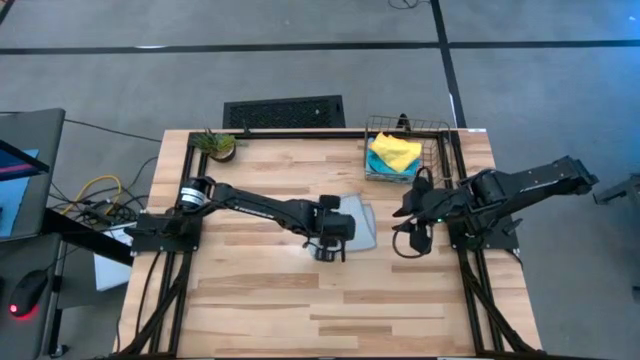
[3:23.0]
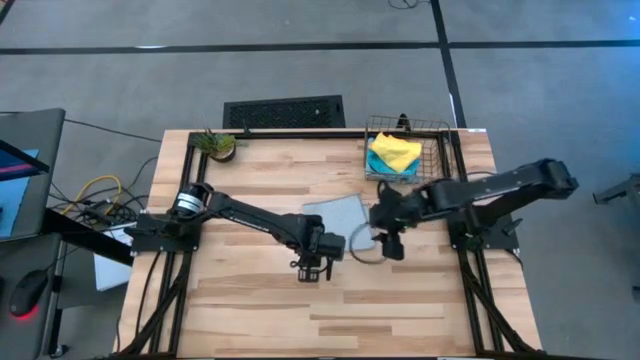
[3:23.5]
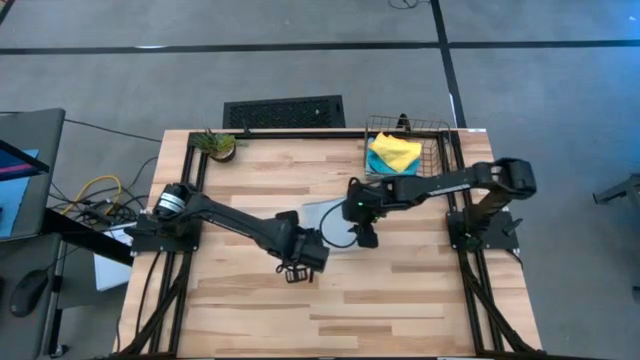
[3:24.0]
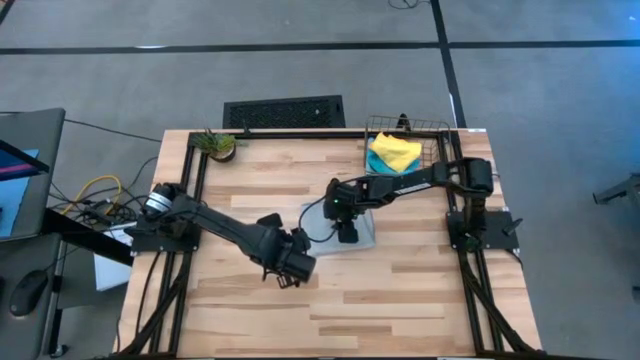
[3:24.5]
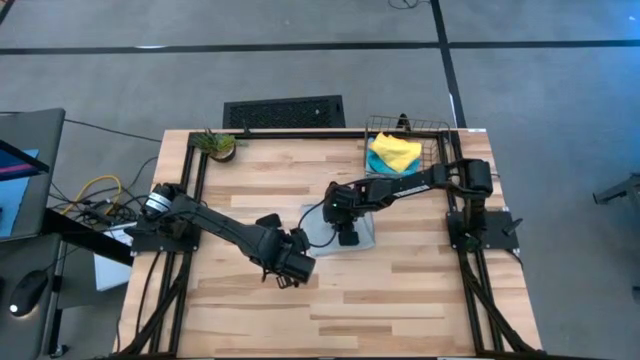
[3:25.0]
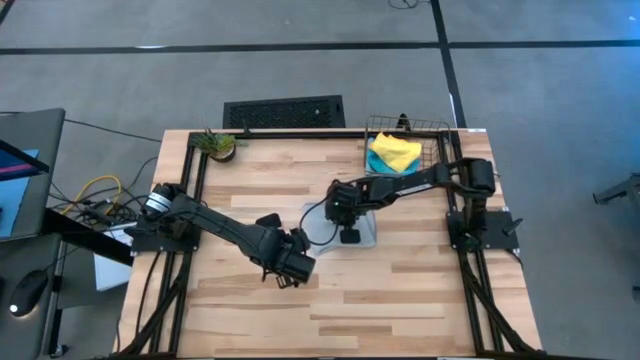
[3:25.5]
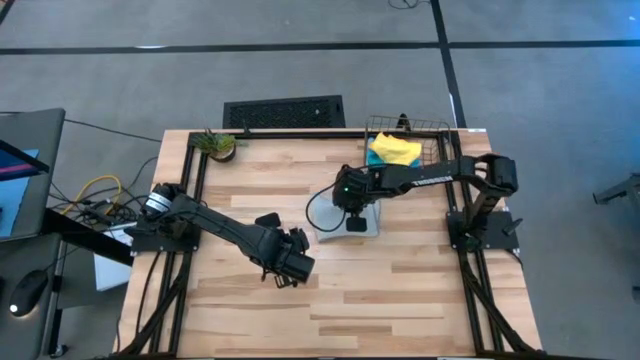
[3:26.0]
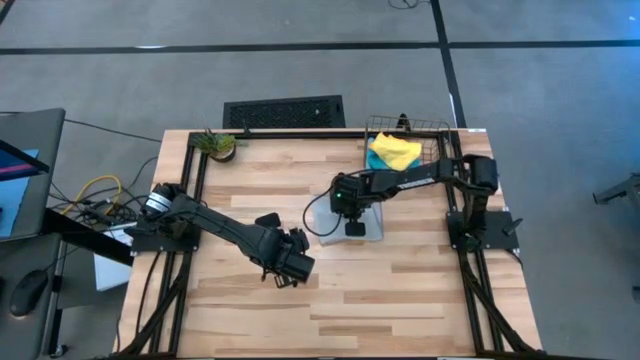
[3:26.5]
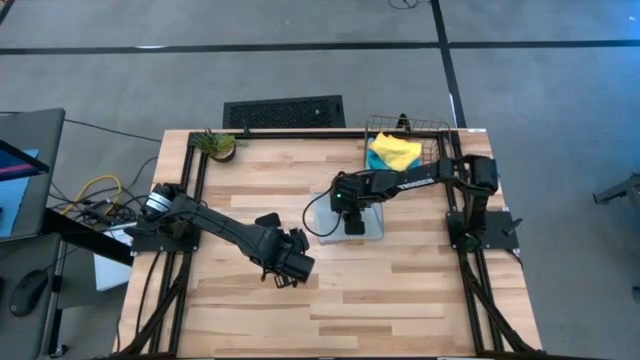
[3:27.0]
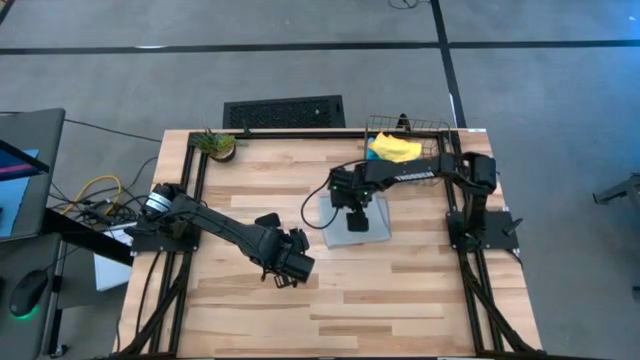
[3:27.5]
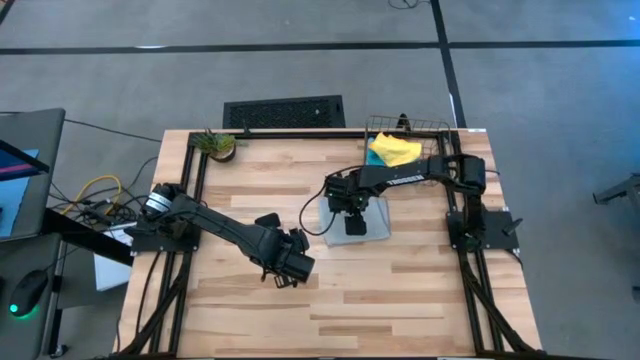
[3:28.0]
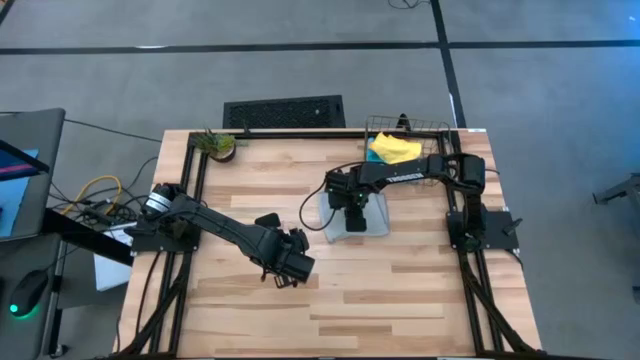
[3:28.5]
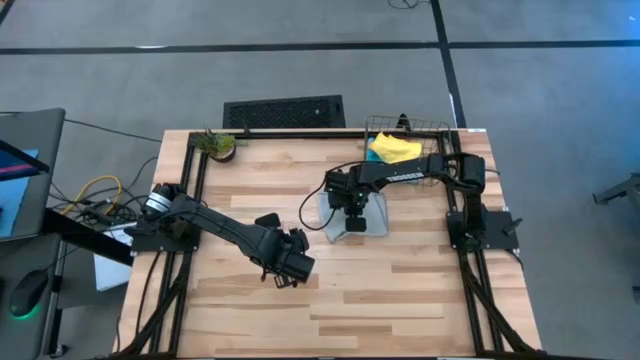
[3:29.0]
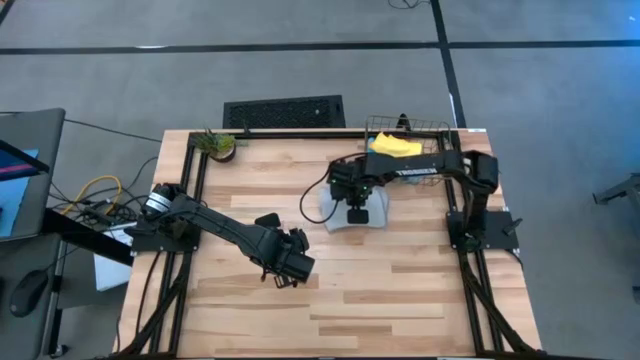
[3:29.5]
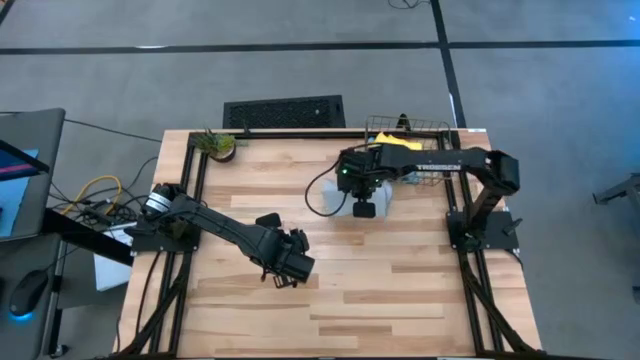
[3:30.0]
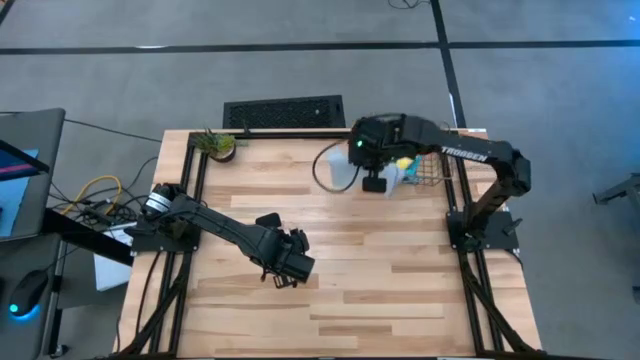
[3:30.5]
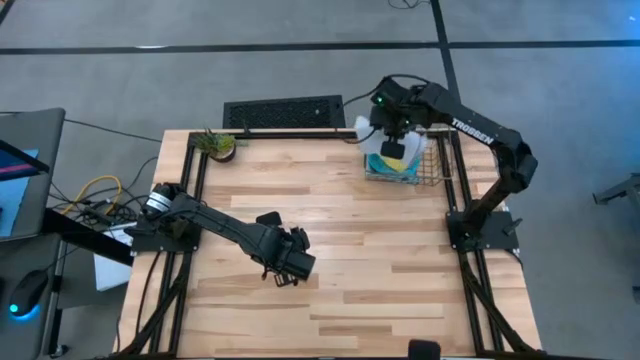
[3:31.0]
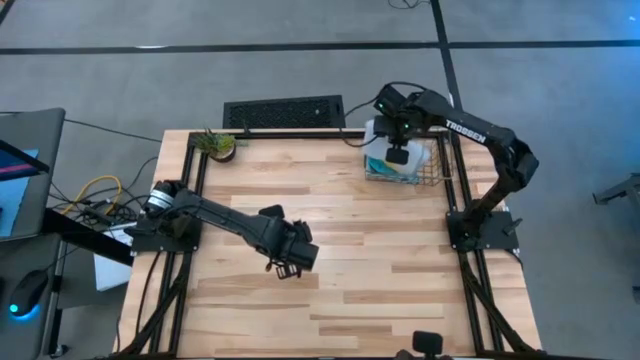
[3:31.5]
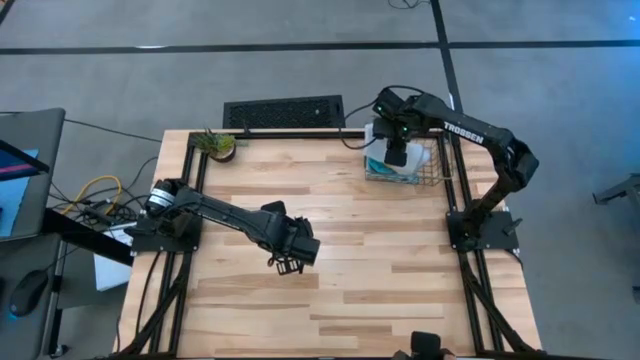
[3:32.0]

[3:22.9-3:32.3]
Task: Fold microfiber towels
Put the folded gray microfiber cloth into the wire basket

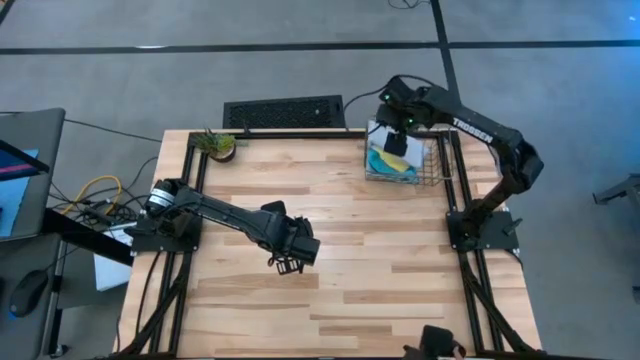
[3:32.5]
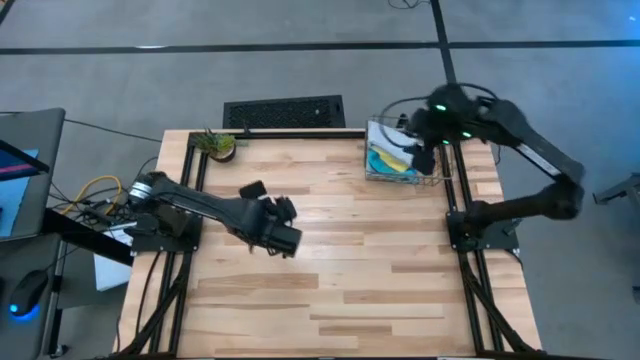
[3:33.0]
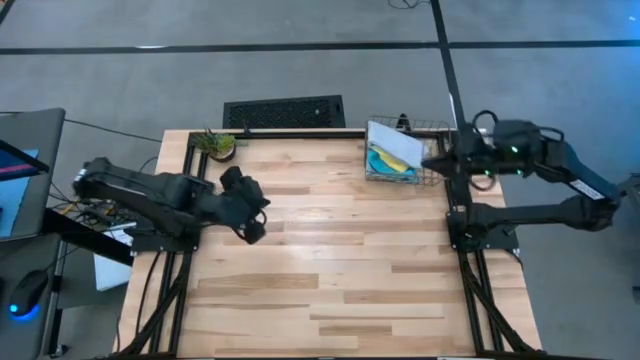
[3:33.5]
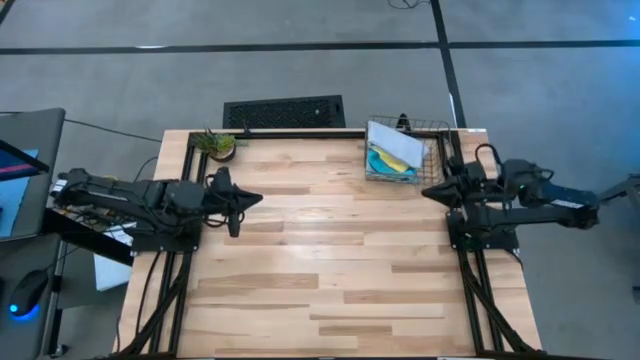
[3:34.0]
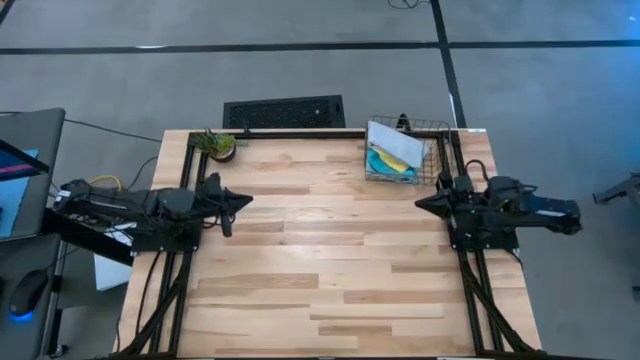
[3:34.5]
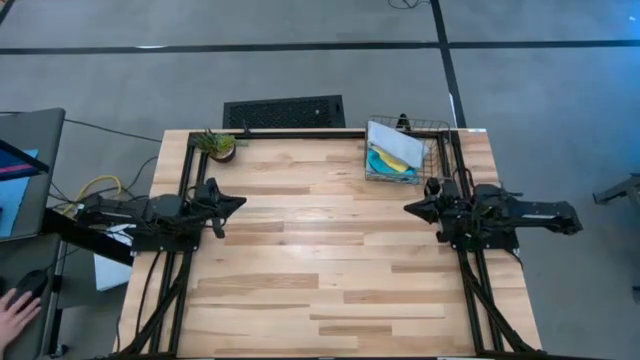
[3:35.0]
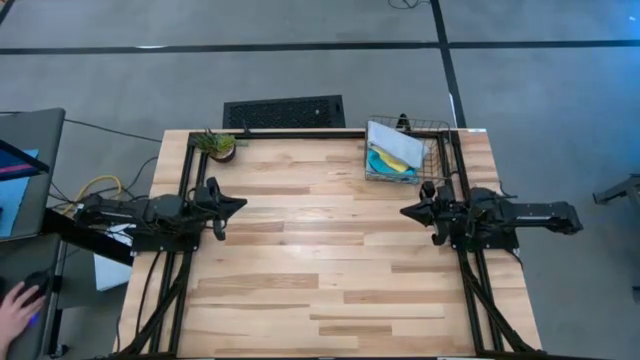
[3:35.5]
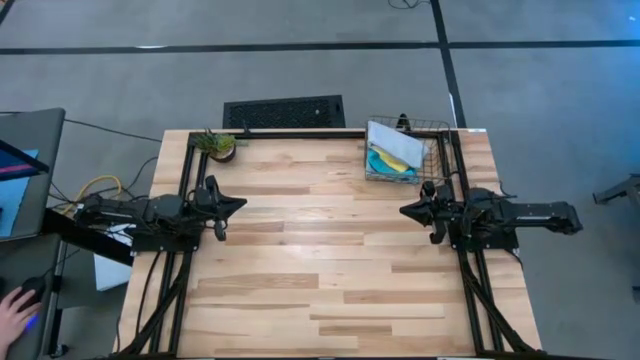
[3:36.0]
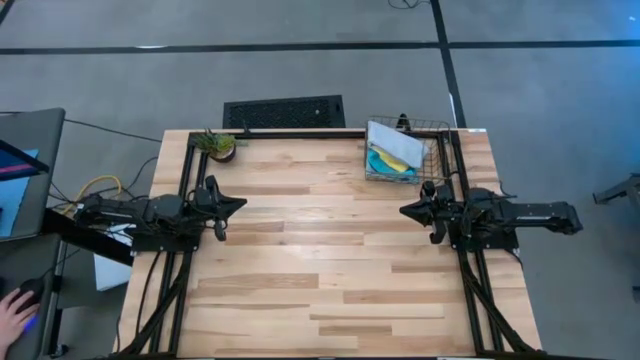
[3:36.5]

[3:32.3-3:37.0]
Return to Home Position

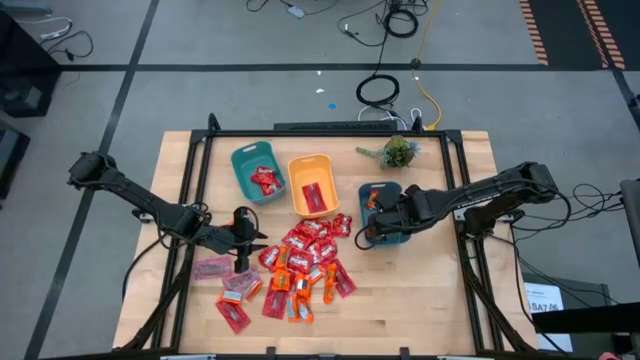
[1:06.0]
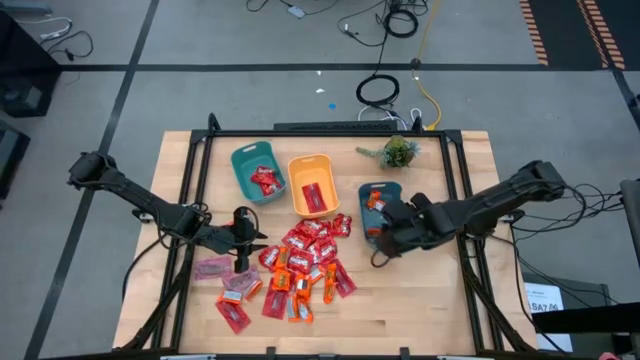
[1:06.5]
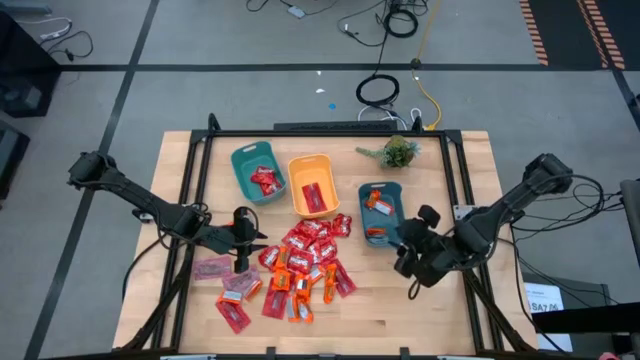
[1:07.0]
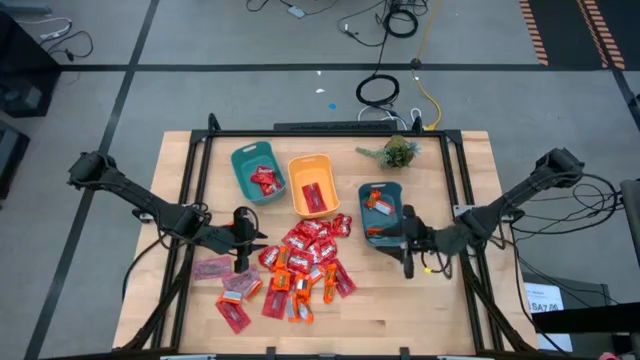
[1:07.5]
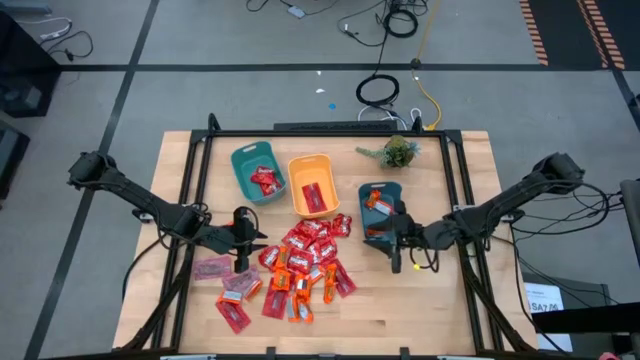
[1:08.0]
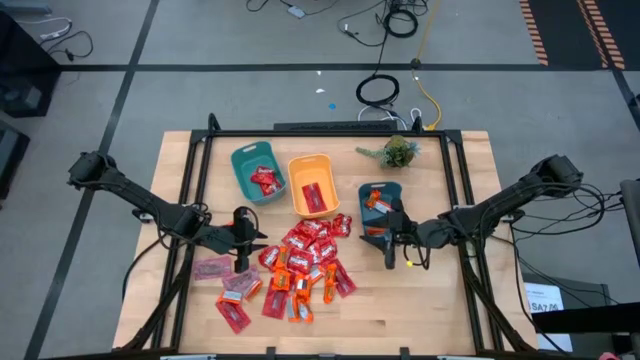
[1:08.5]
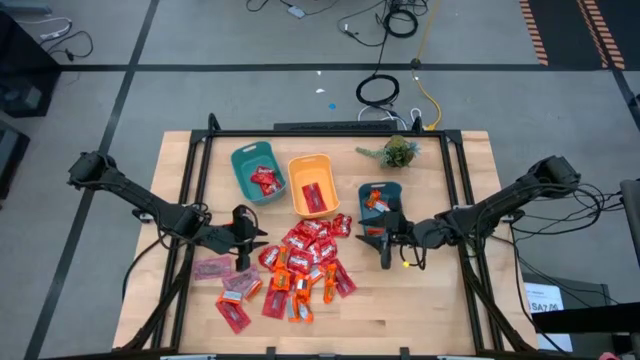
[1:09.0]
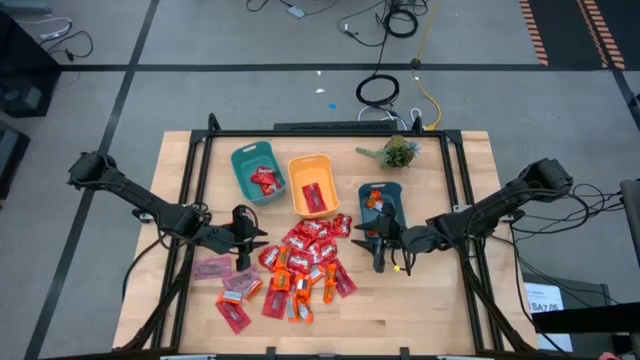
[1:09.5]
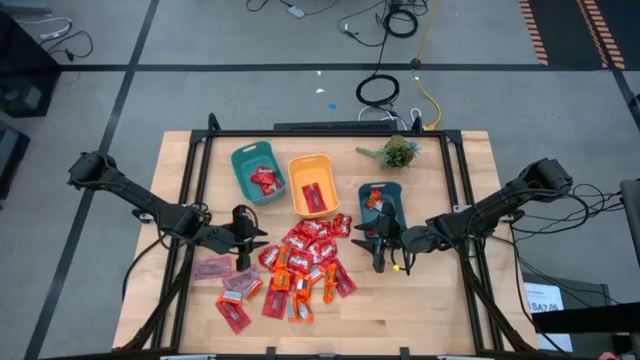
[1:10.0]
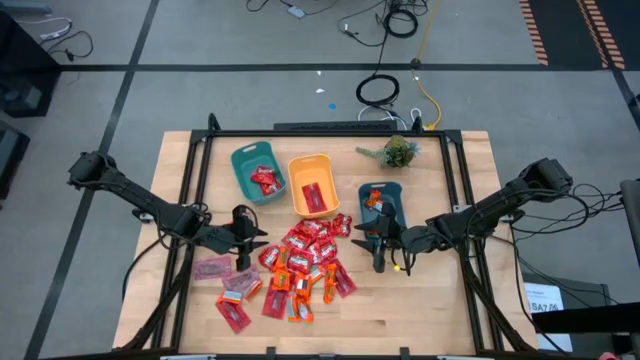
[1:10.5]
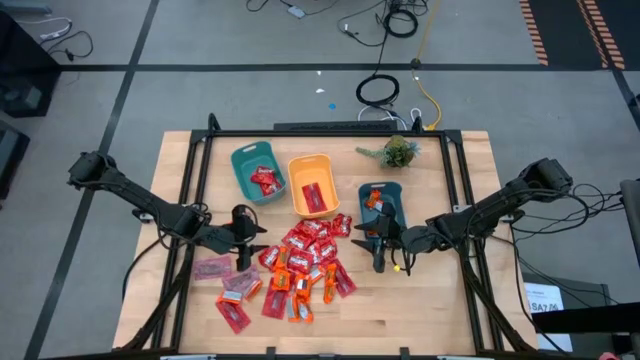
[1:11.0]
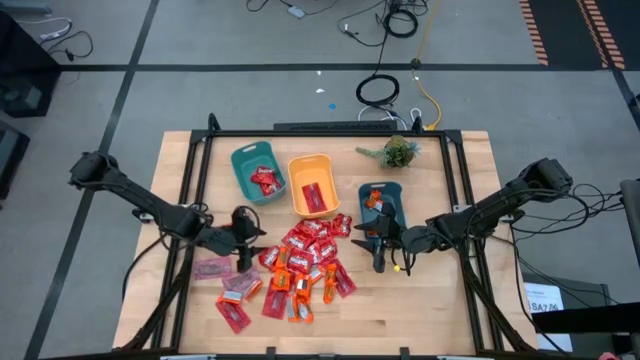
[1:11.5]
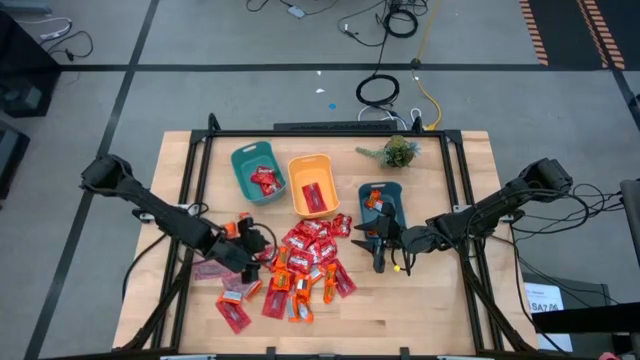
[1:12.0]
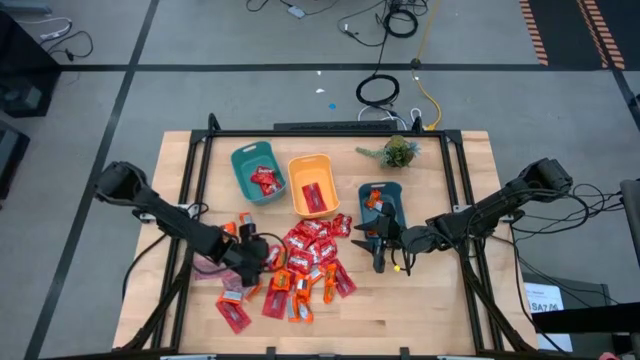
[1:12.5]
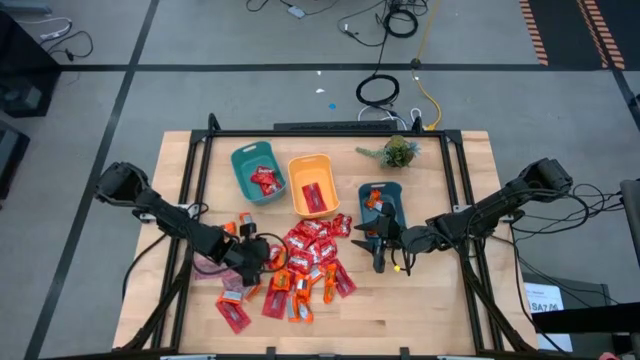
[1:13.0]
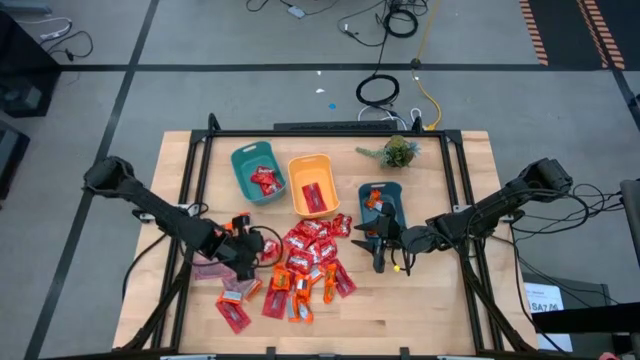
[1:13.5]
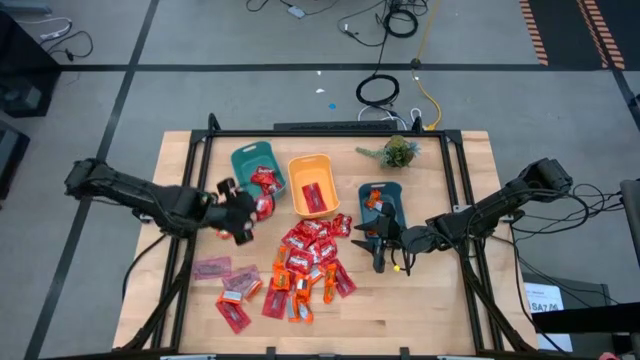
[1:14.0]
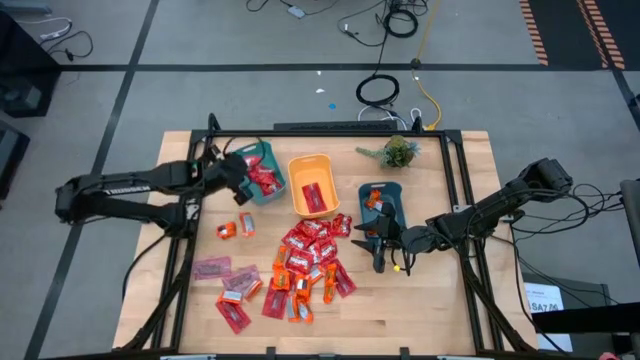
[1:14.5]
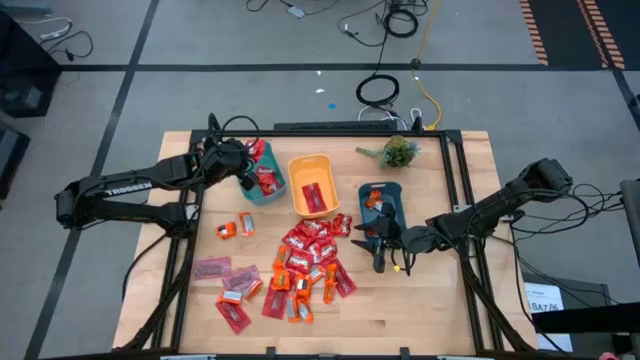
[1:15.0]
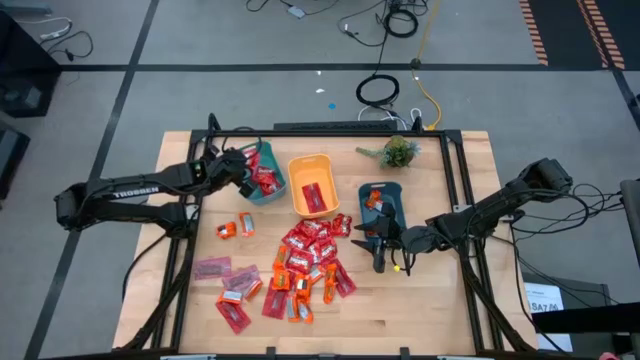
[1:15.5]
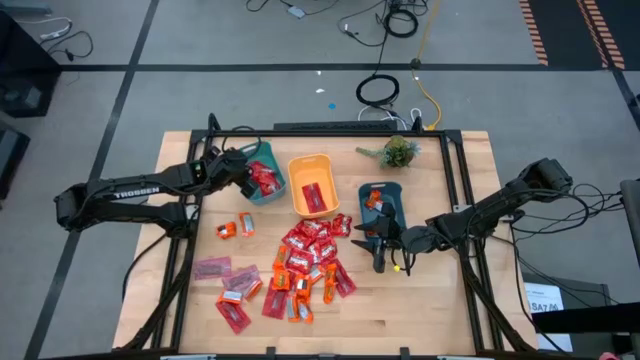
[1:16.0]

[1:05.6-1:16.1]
Task: Sort candy
Put the red pack of candy into the light blue bin
